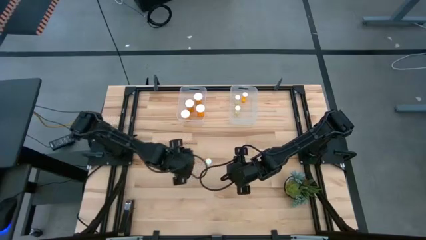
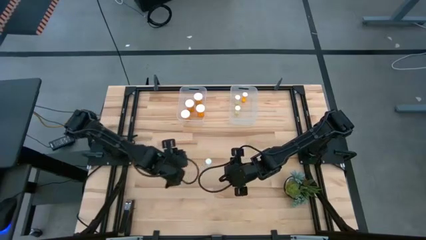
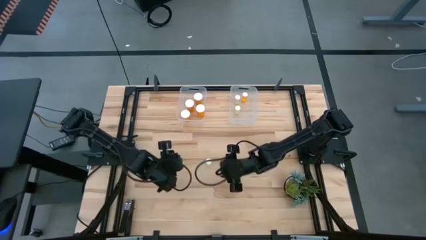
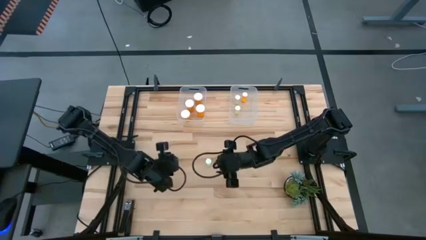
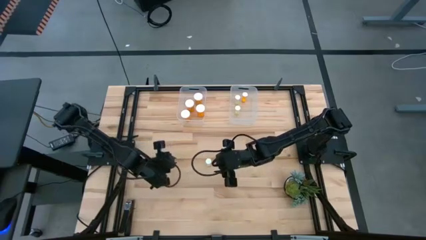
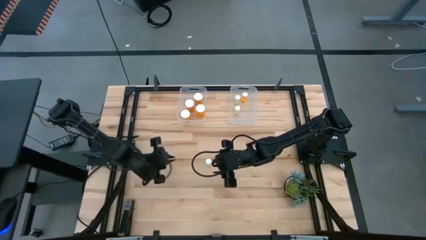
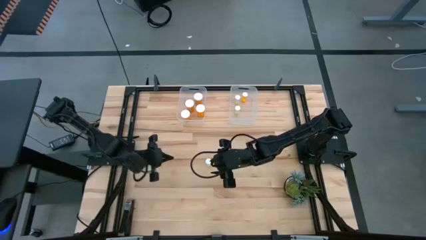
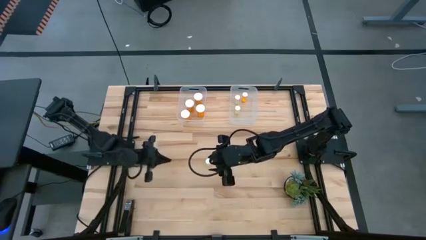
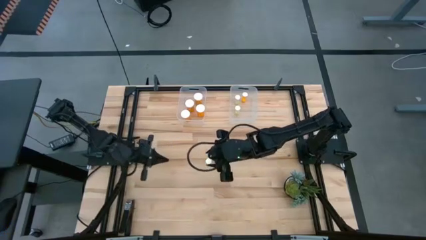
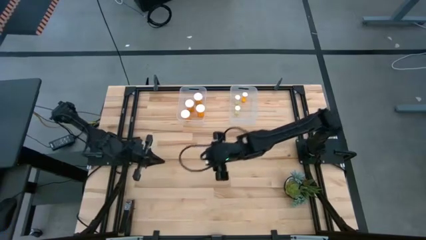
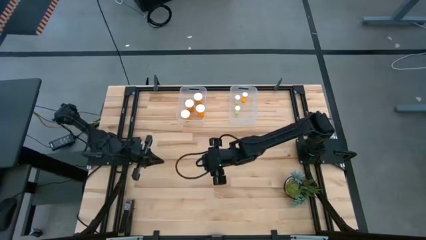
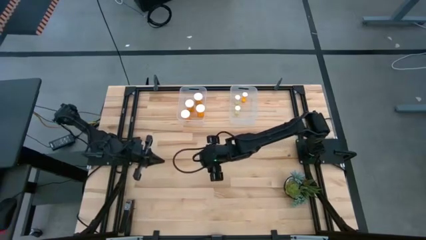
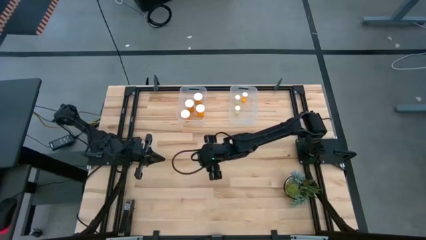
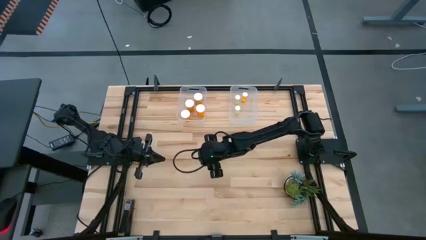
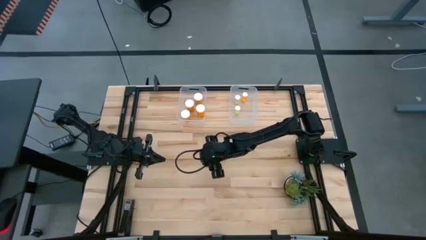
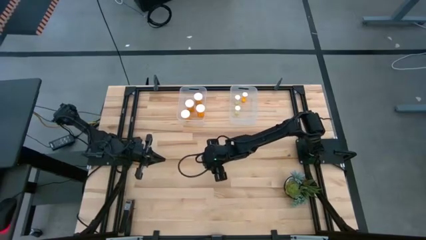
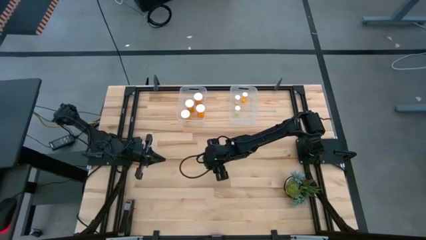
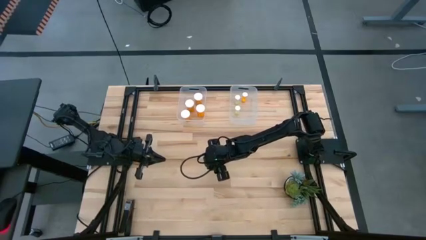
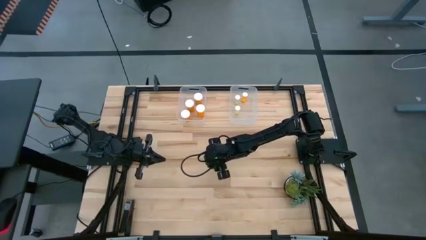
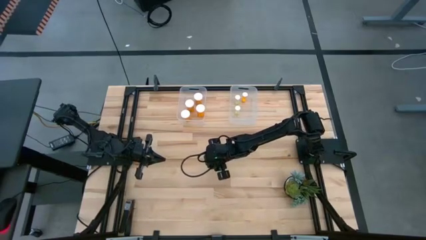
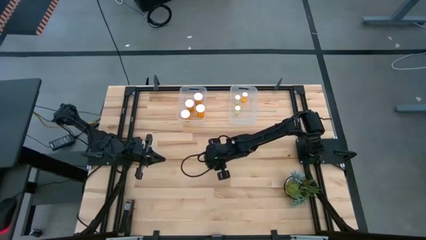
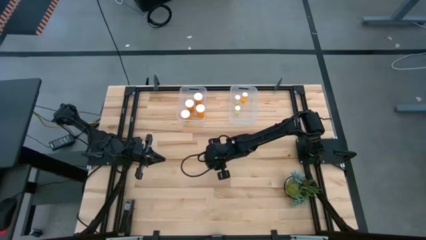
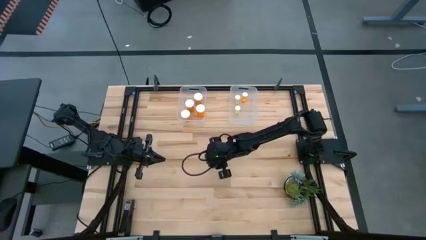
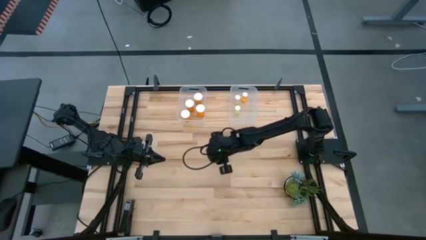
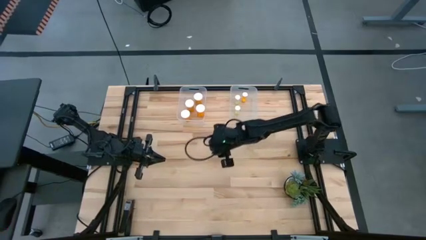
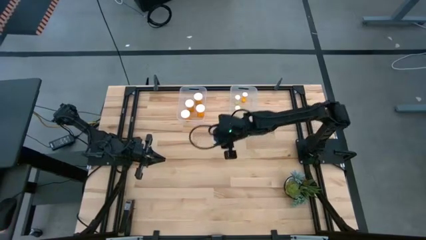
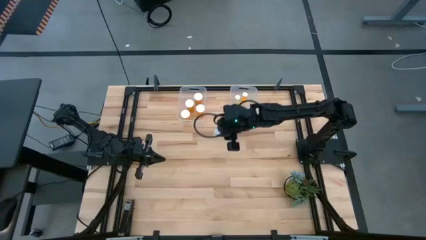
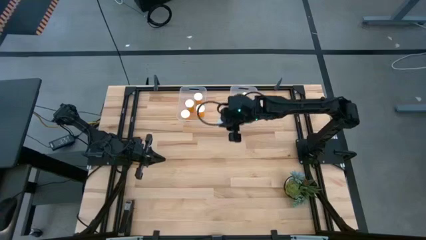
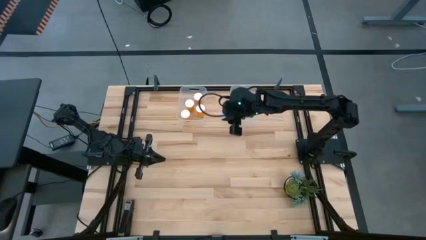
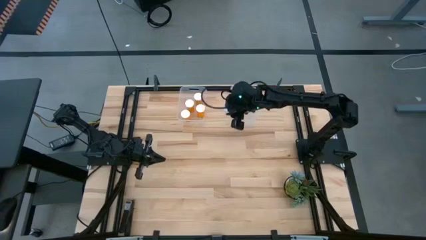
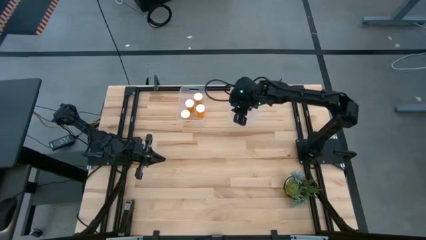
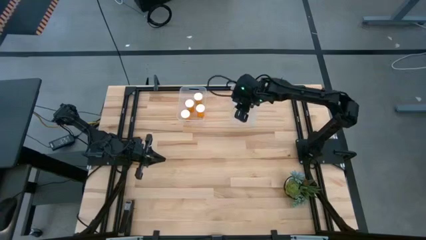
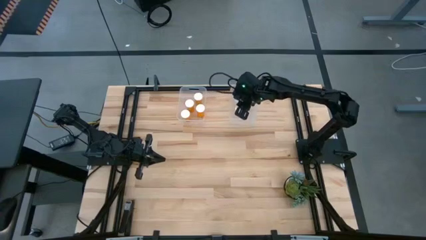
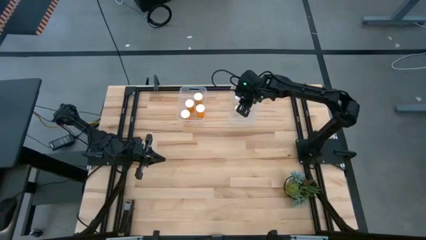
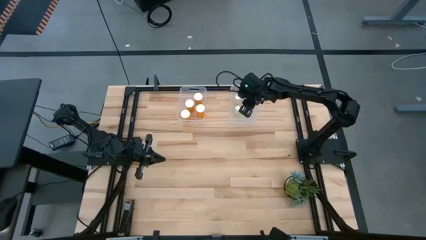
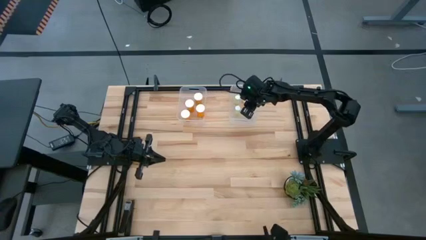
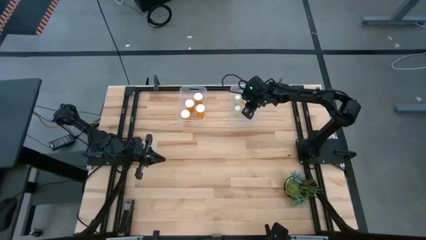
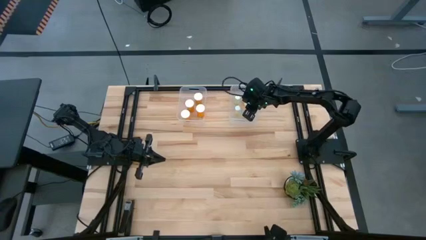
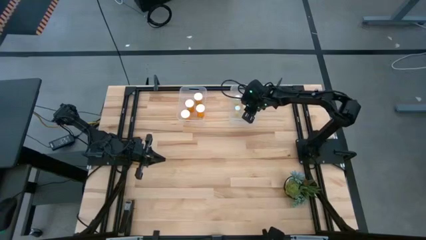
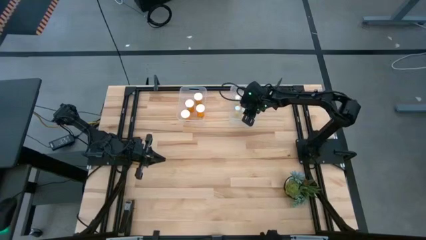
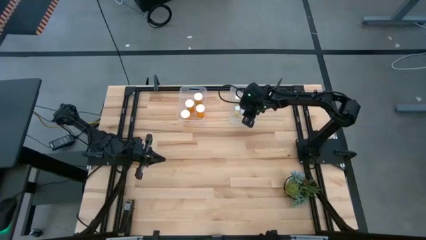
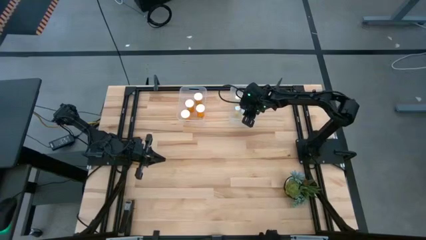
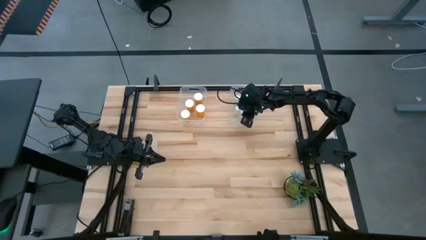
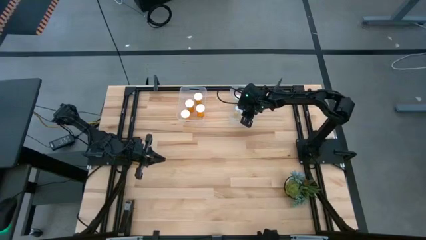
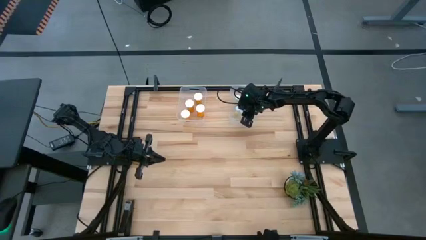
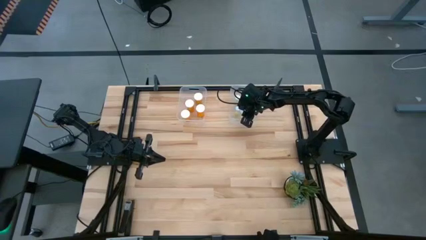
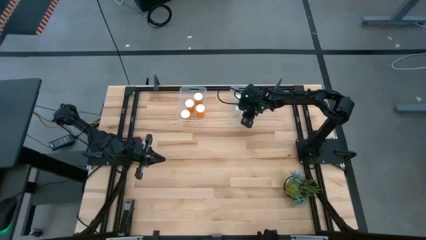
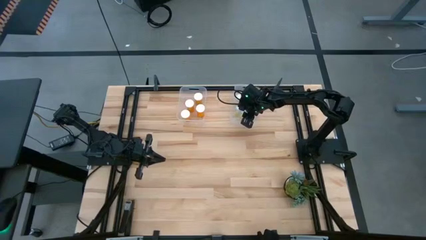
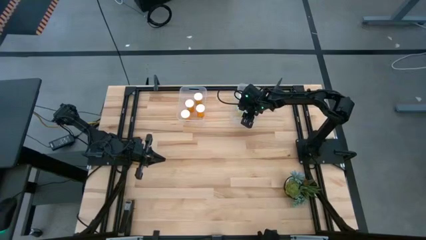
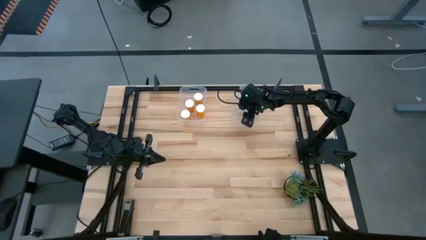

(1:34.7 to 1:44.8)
Task: Pick and place medicine bottles into bin by pill shape (circle, oval)
Put the small yellow pill bottle into the right transparent bin
